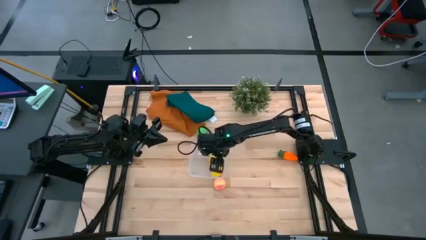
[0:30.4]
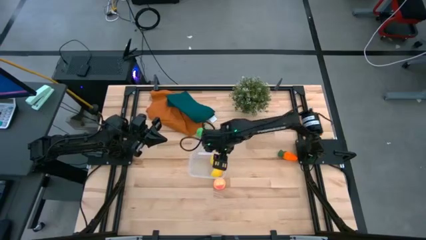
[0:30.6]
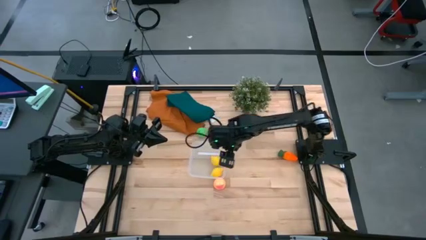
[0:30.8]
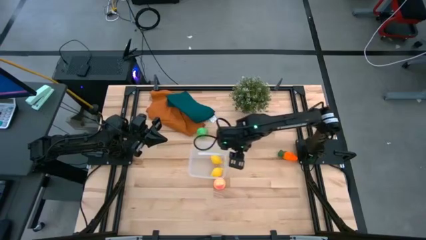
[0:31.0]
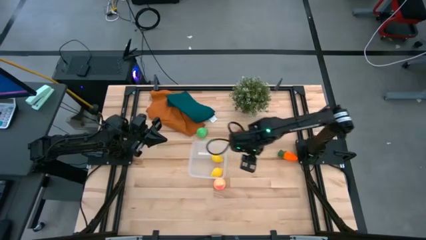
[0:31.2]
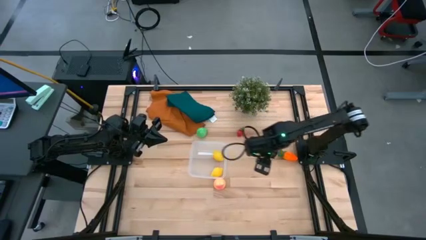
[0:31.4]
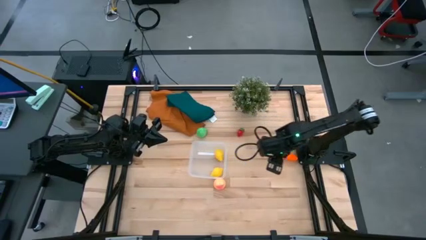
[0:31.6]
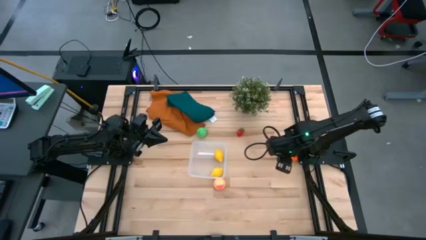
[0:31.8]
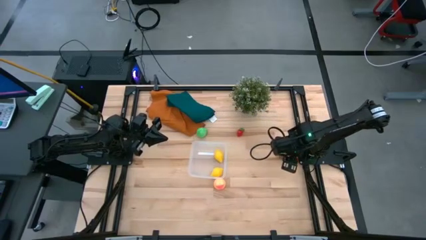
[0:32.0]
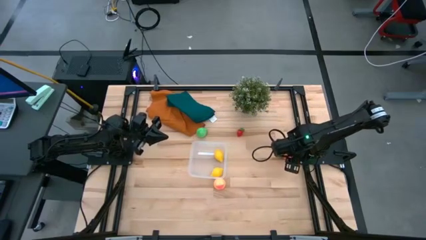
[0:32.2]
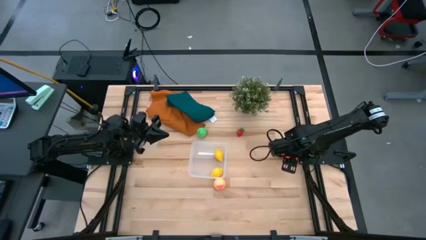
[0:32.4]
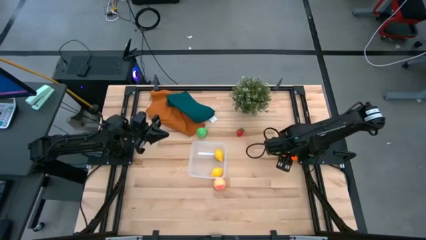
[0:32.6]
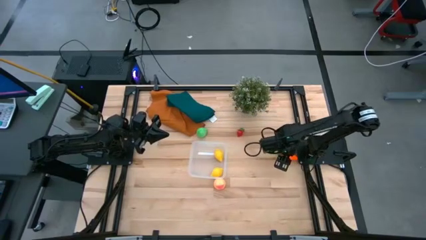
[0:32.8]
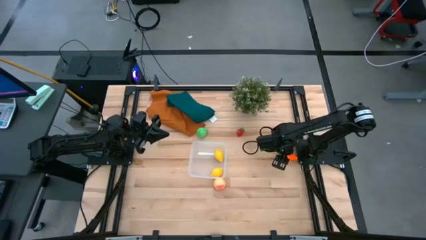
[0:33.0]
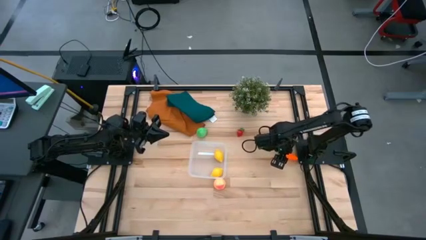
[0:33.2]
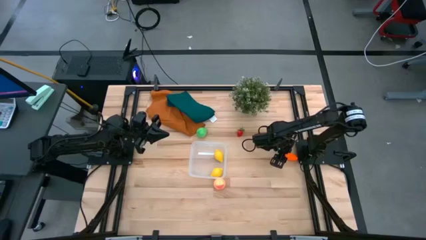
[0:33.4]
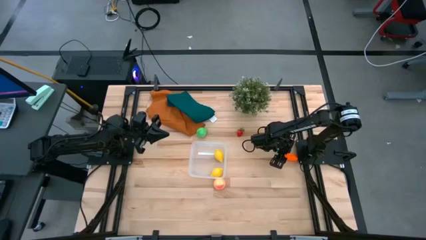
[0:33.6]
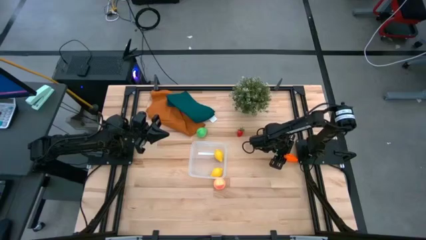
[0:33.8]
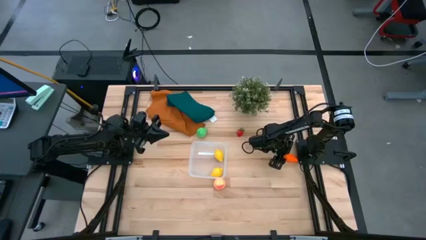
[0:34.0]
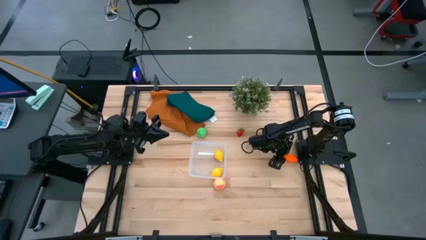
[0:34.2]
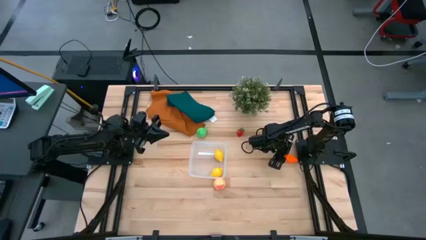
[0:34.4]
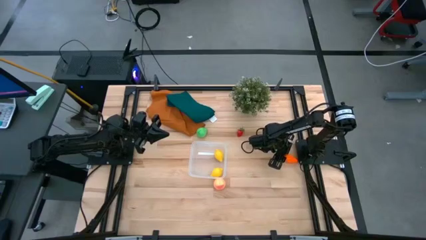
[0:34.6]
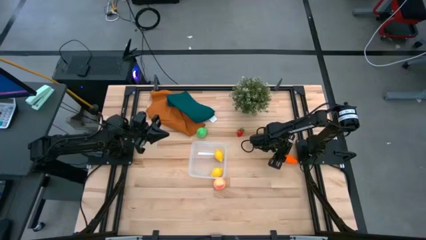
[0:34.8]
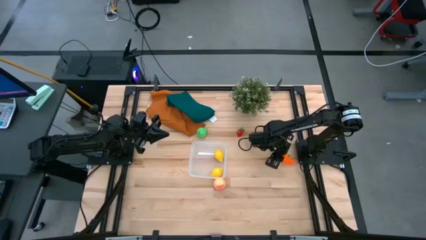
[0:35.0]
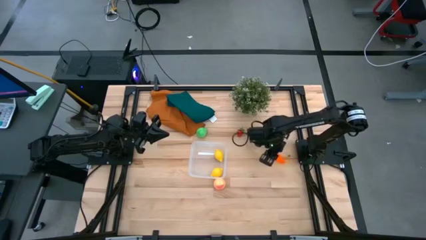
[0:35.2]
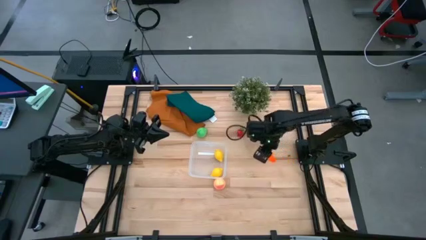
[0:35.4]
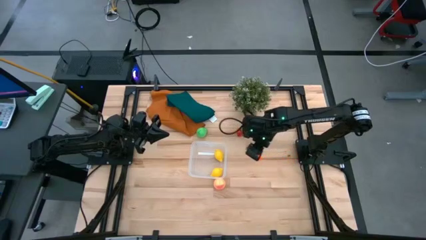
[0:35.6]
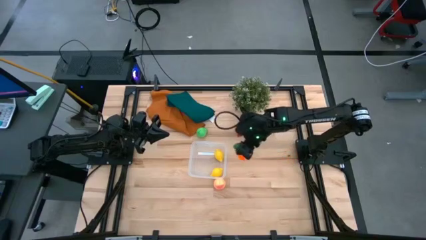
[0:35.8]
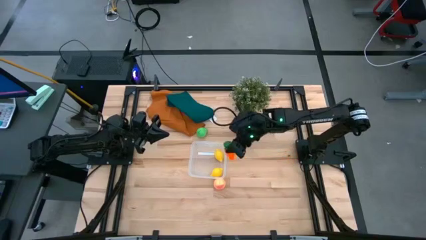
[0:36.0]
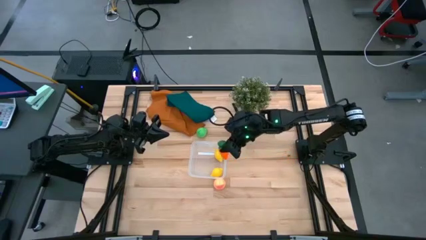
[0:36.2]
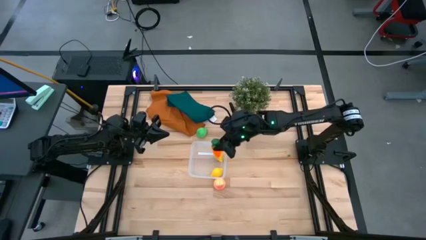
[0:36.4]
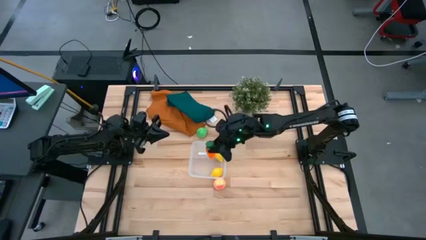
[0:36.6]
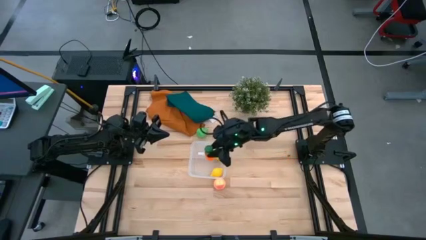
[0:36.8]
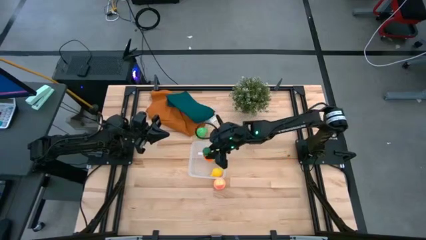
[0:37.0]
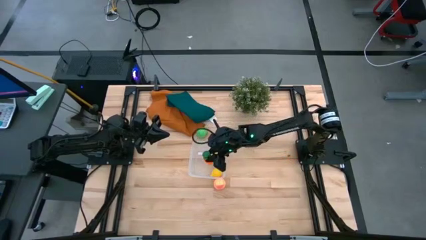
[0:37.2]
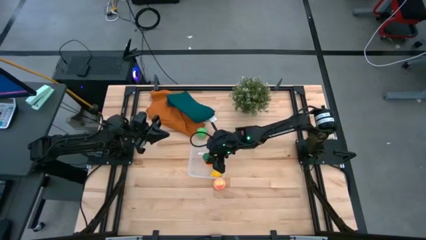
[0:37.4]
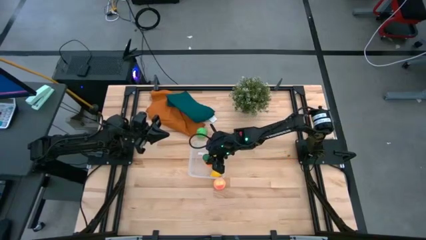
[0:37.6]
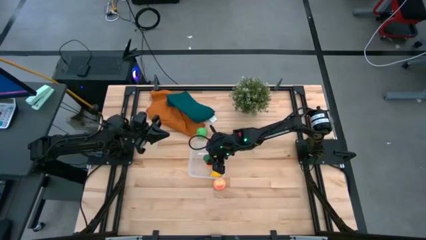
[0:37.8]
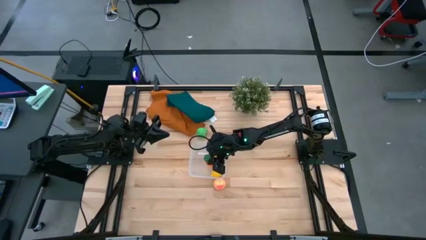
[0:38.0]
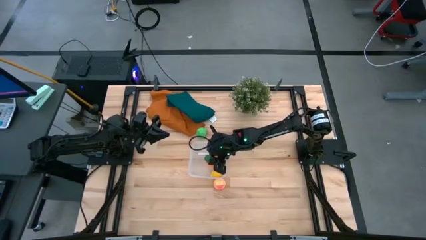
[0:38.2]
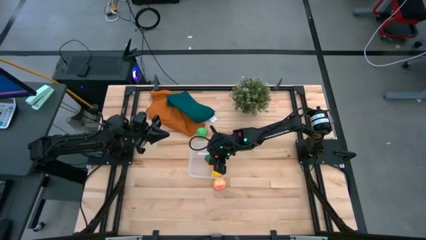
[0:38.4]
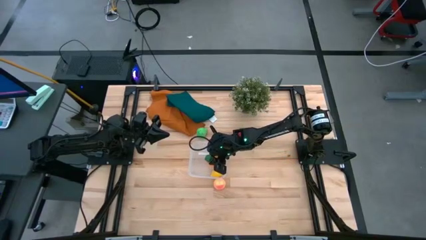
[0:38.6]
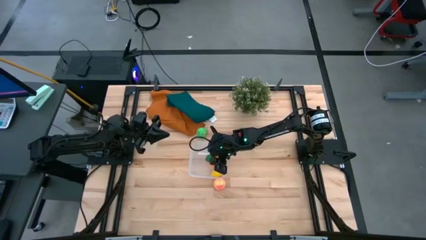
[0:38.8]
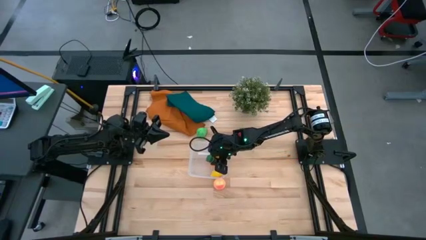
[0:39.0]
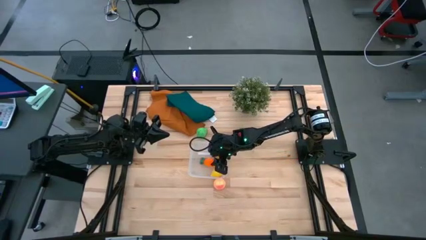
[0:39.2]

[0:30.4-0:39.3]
Task: Pick and placing Produce into tupperware
Put the orange carrot into the transparent container

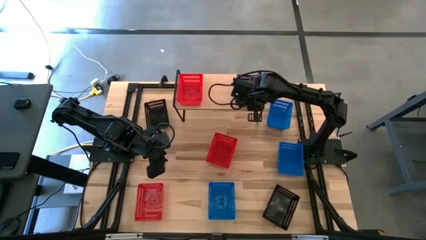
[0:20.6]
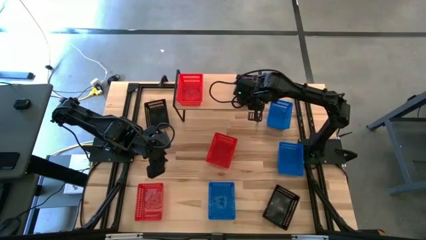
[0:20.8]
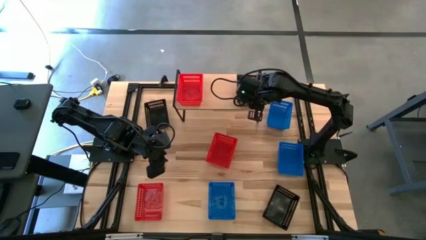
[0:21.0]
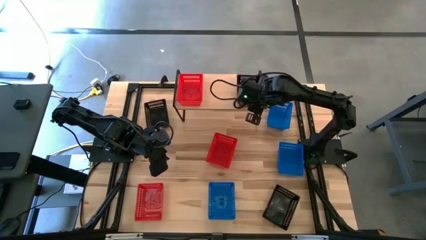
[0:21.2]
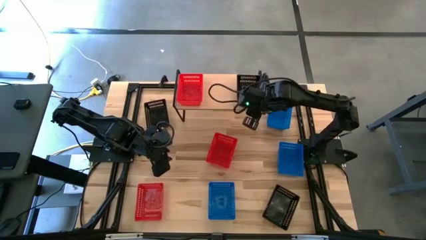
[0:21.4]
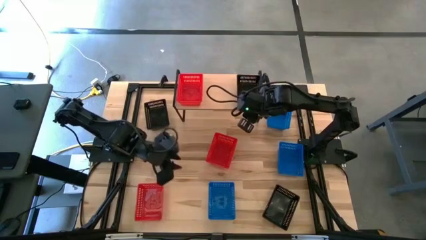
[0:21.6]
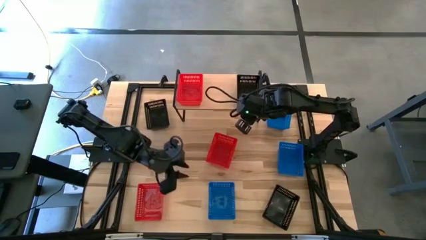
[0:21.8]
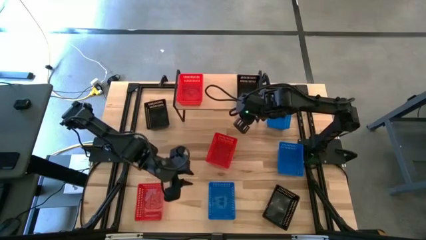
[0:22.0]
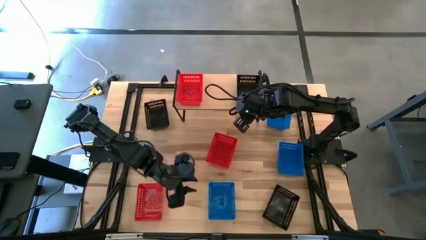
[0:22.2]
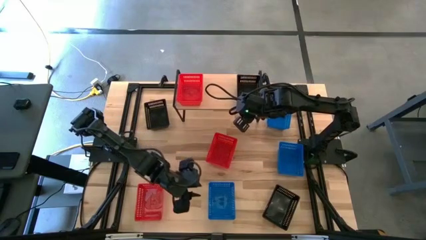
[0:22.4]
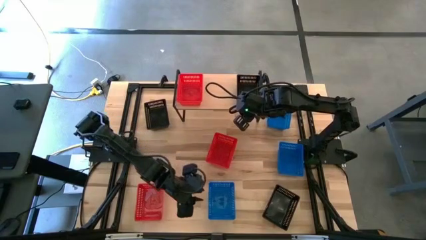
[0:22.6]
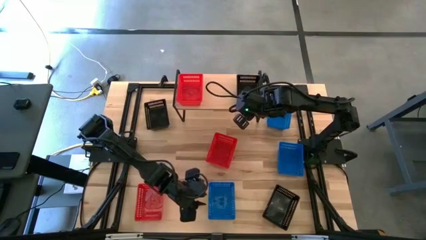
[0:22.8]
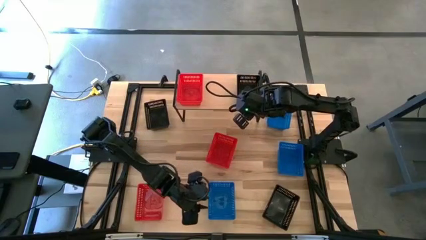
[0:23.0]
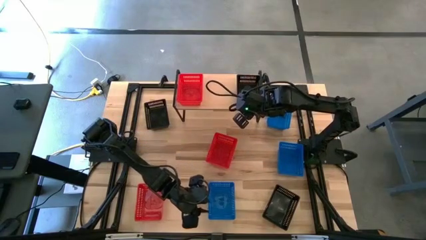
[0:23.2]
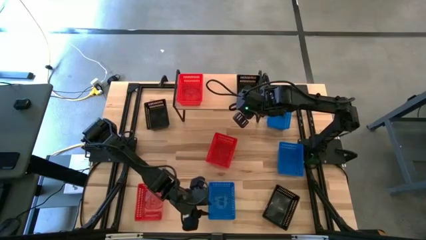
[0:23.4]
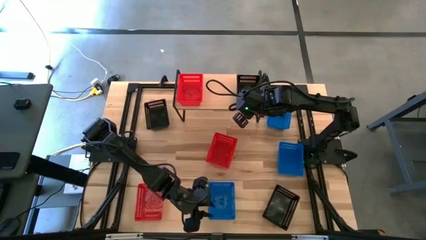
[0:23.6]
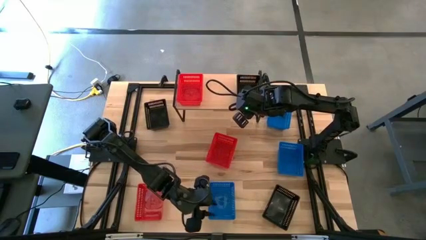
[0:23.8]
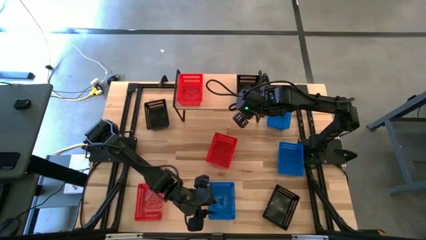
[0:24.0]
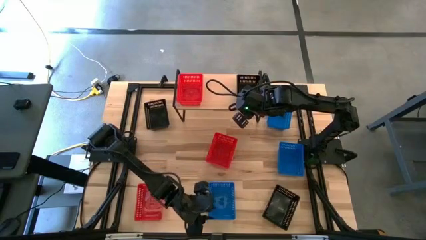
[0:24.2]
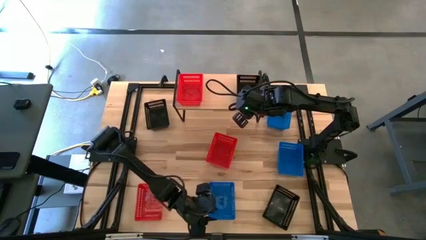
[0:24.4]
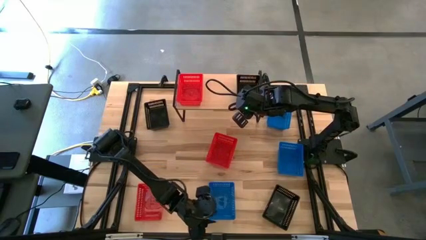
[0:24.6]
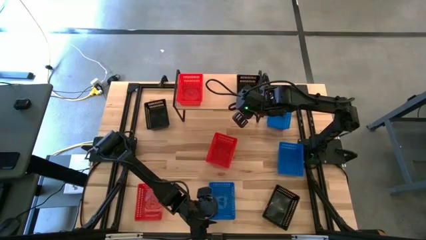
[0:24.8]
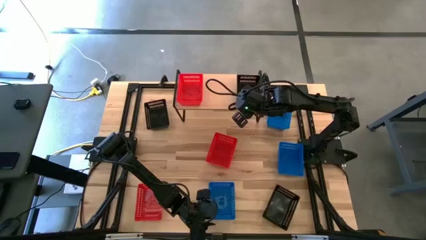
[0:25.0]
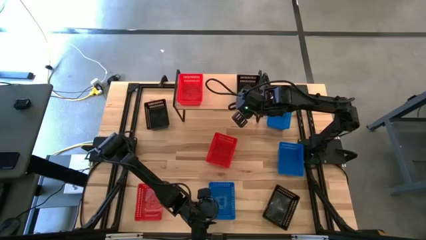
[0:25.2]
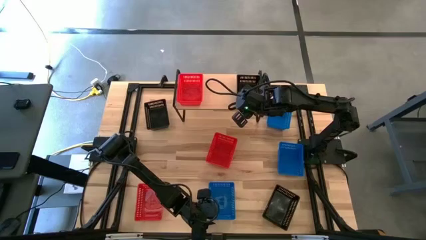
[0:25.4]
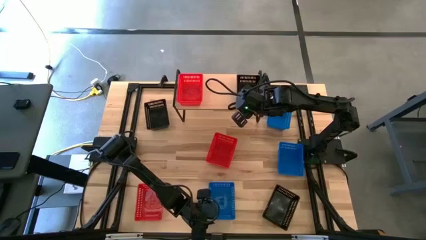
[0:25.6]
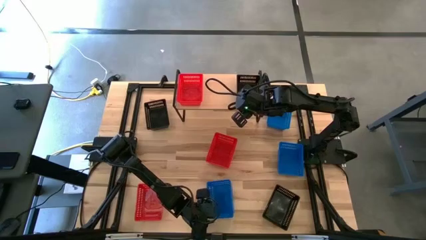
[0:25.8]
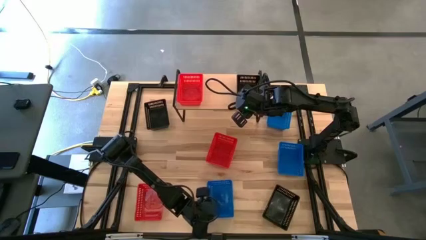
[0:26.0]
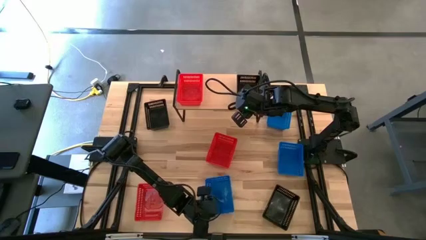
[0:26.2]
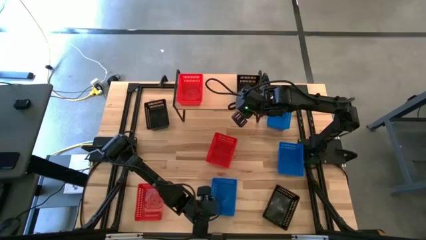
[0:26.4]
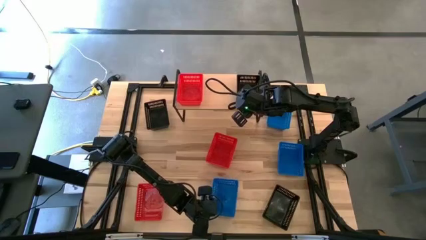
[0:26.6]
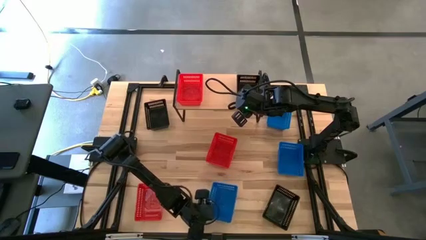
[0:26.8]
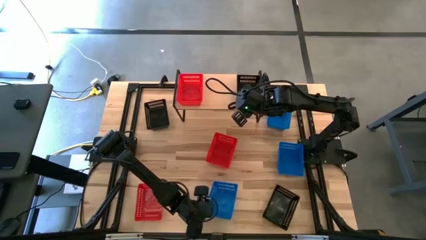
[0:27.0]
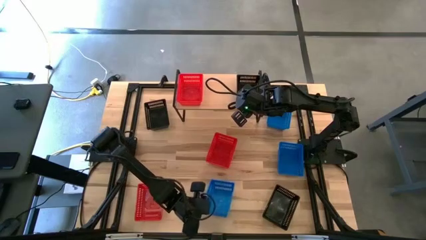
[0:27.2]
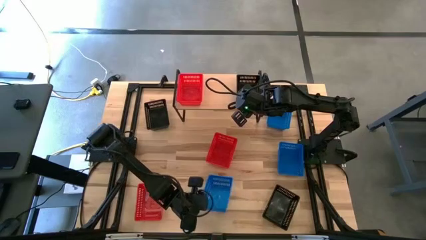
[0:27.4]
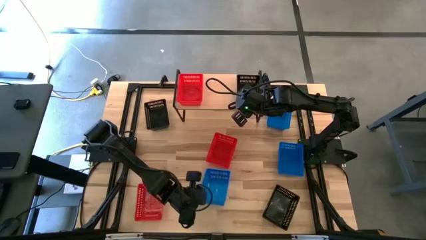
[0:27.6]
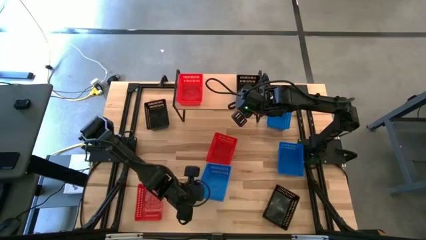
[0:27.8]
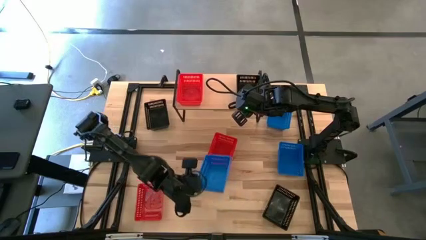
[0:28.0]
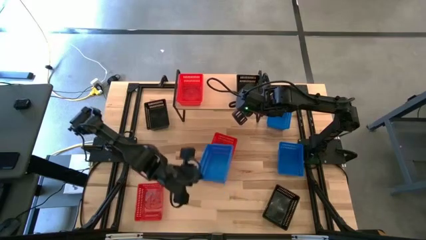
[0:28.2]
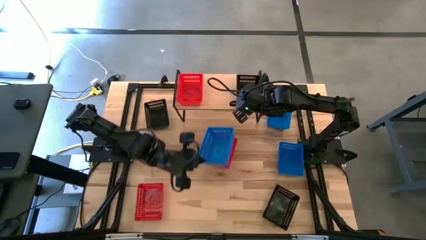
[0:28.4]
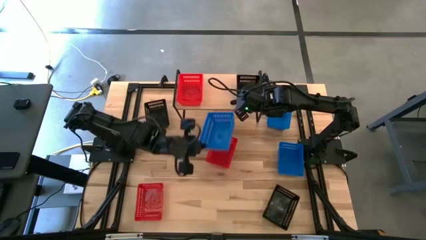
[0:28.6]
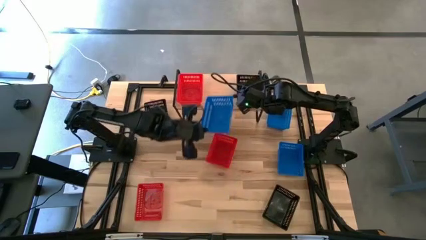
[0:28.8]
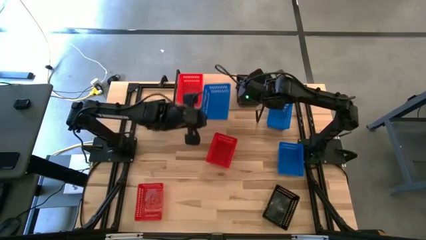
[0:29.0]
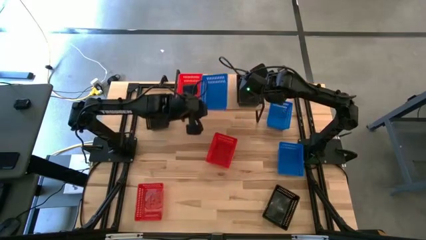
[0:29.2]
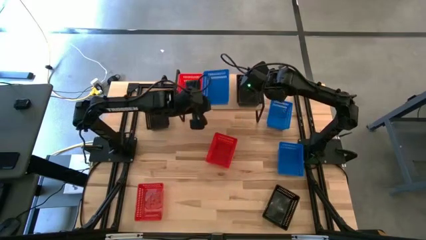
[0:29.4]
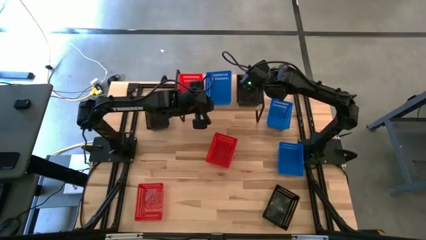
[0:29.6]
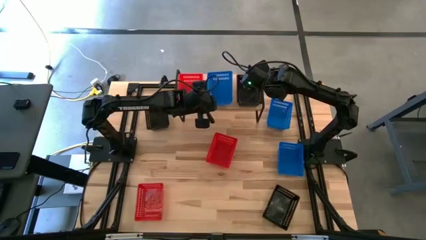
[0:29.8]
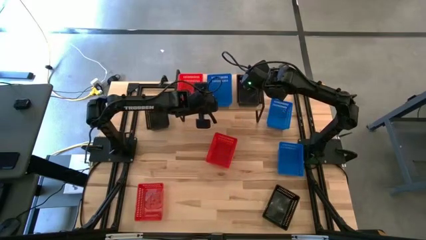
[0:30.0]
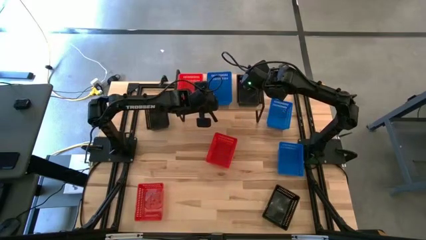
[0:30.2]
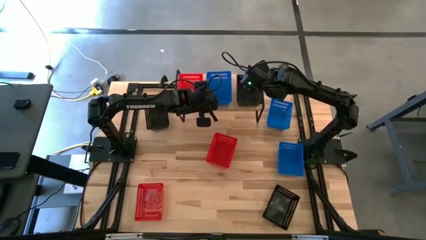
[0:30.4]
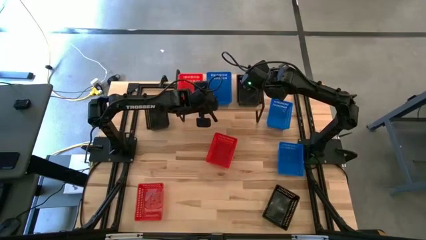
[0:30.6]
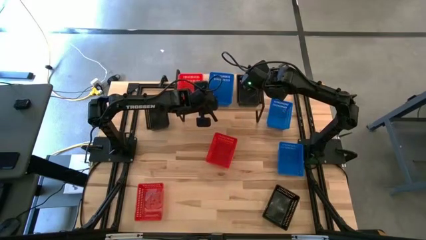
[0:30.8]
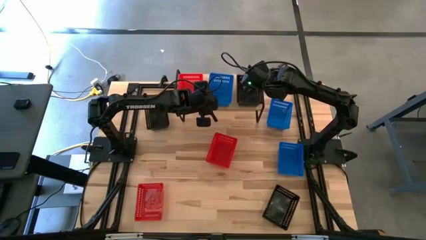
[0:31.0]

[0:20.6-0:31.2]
Task: Stack baskets on shelf by color
Put the bottom blue basket on the shelf
